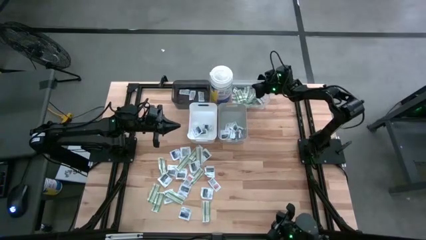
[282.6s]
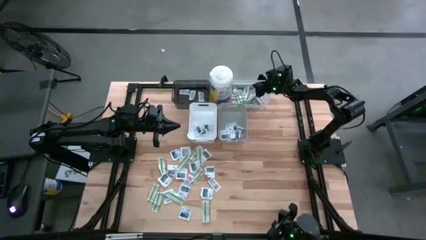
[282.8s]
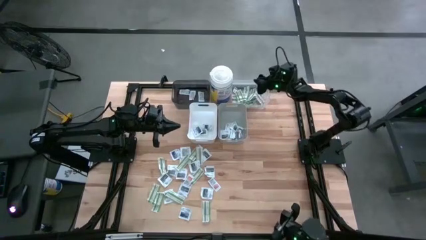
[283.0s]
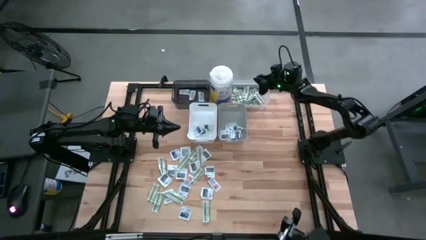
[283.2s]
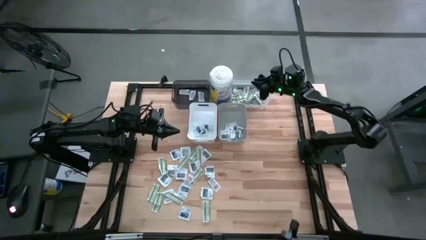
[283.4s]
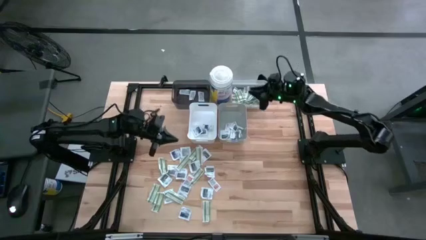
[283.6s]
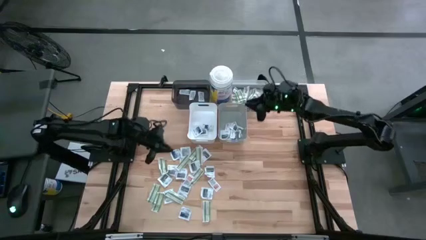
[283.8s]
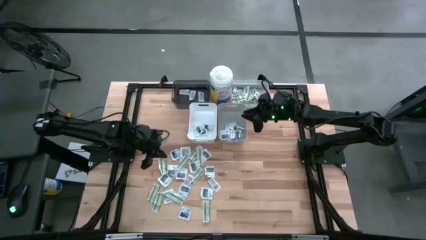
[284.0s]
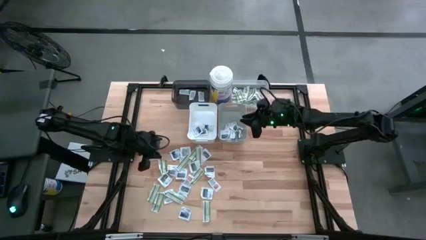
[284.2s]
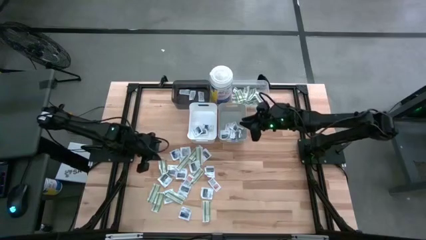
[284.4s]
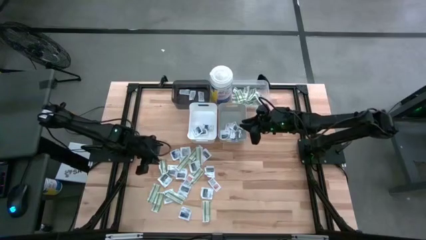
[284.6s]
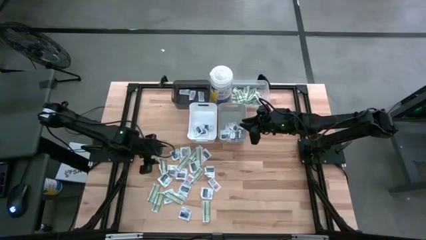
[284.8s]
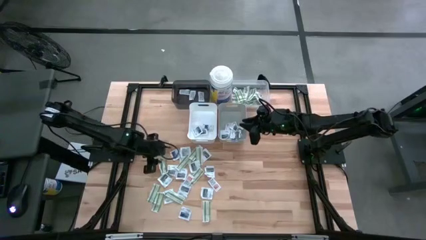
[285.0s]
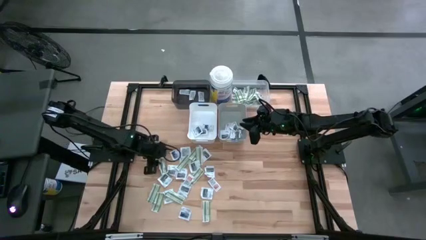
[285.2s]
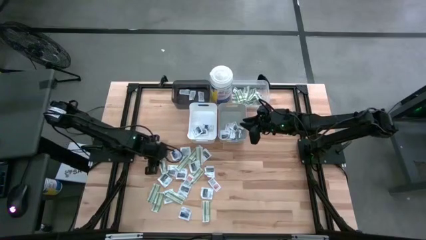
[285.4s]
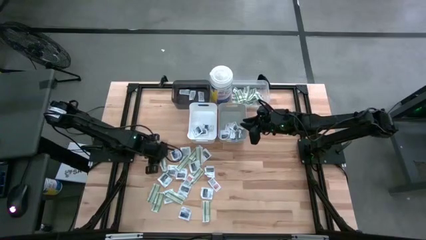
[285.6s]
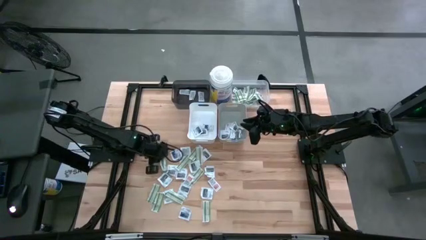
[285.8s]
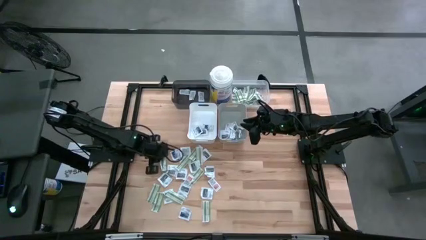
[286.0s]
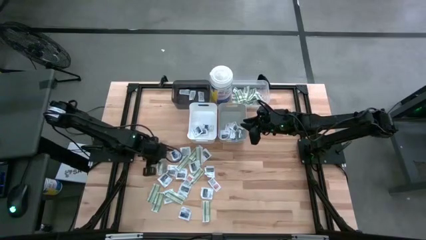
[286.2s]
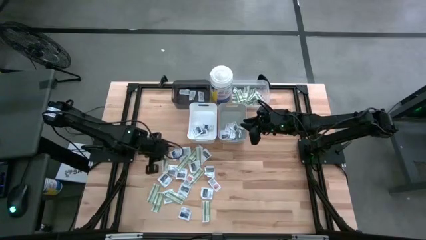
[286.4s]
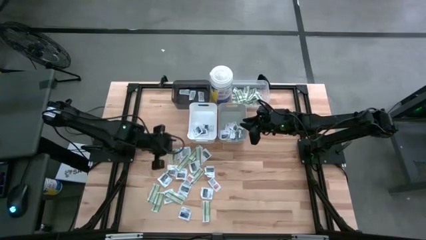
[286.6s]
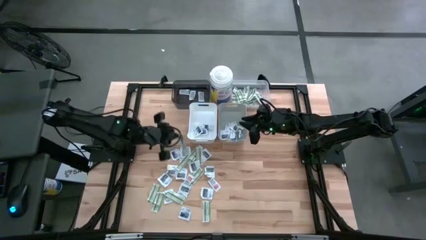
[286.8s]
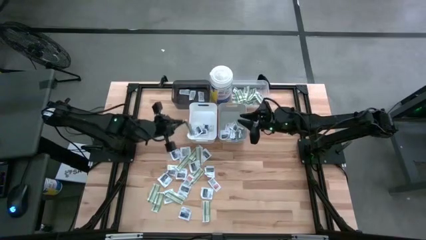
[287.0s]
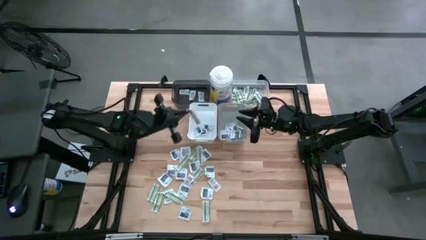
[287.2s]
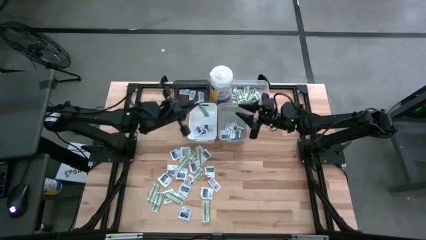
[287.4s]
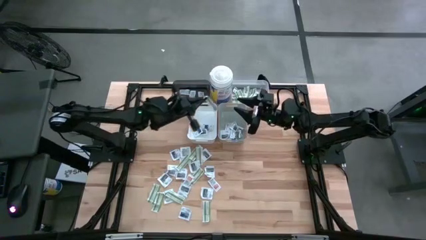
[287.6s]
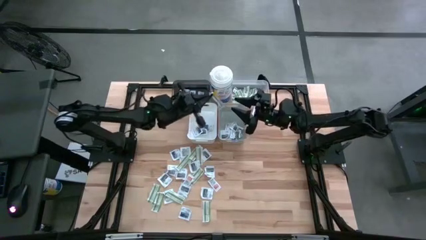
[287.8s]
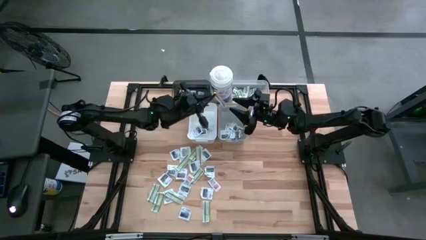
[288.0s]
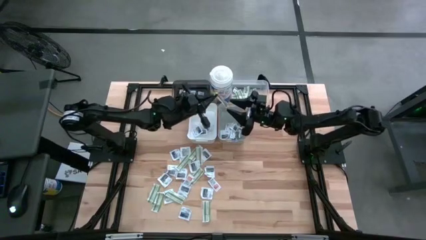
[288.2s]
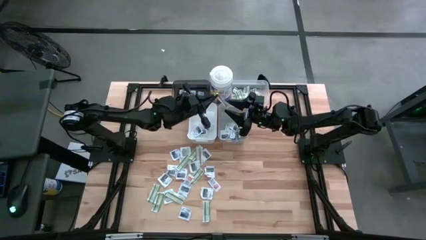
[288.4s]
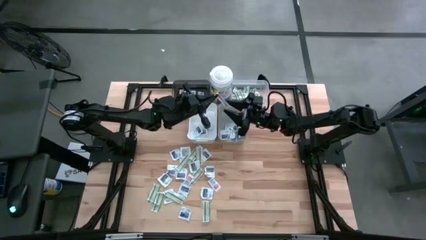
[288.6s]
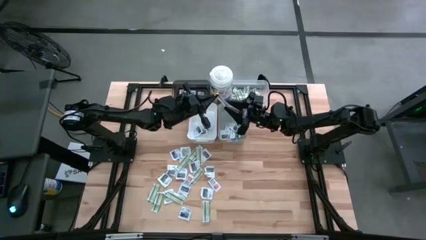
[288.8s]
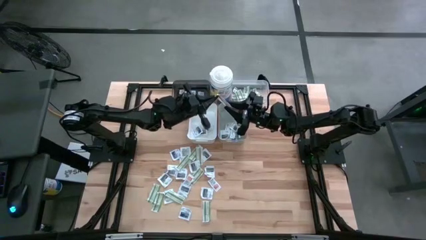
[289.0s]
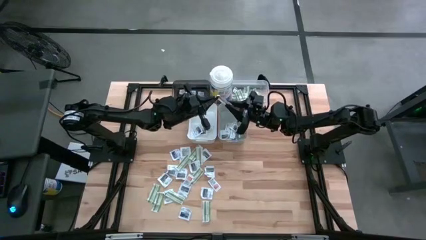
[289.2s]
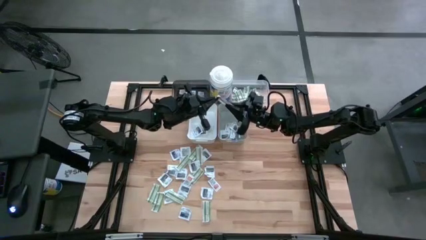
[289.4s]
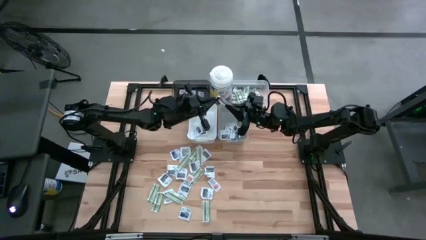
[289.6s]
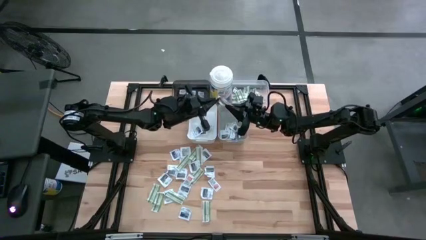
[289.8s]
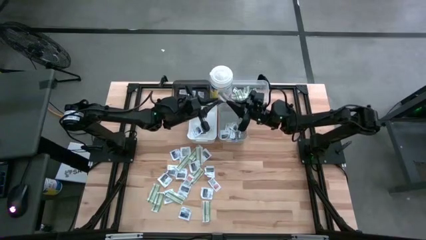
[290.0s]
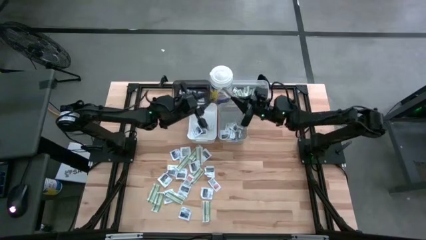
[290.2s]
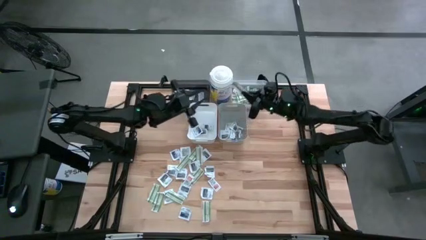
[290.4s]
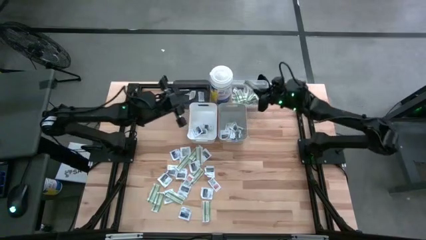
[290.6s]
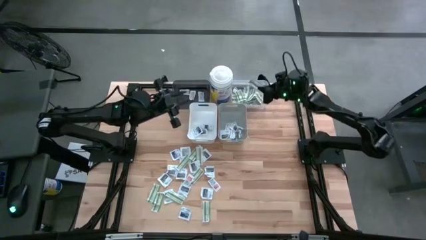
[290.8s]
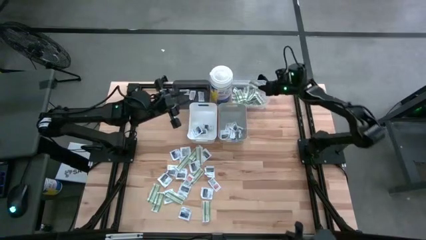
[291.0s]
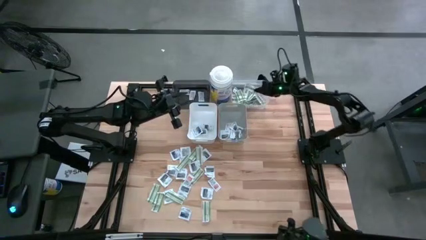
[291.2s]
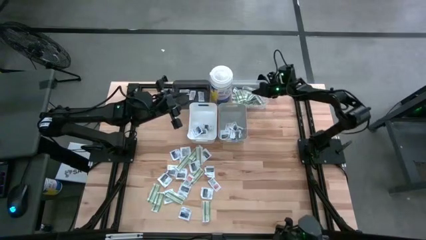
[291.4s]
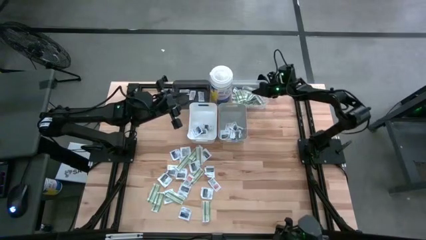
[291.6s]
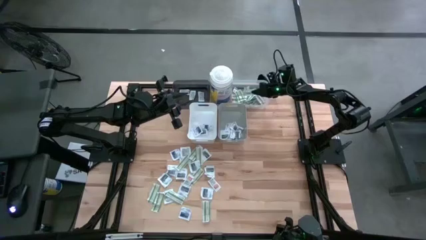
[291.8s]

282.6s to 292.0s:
Task: Pick & Place First Aid Supplies
Put the band aid into the transparent bin

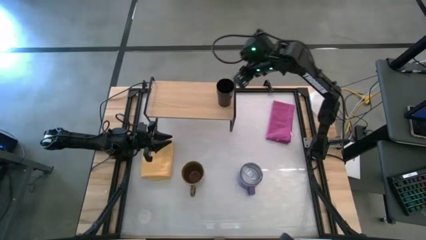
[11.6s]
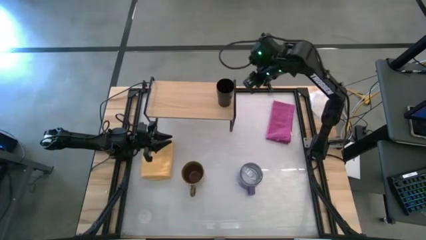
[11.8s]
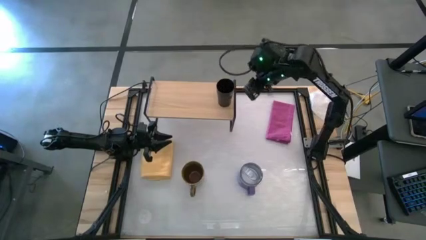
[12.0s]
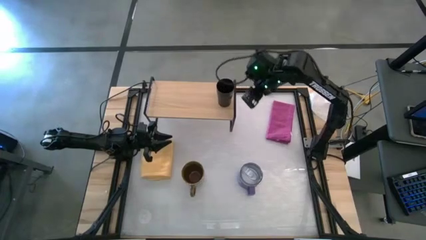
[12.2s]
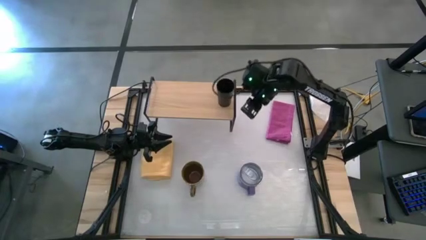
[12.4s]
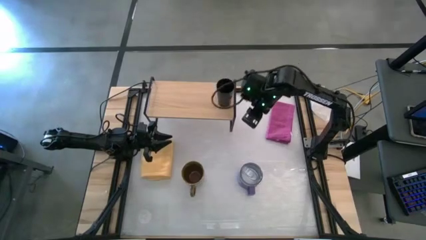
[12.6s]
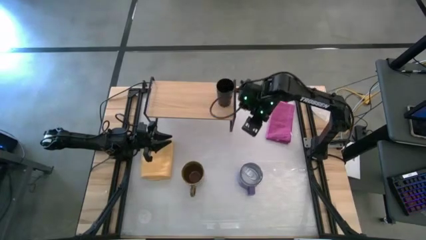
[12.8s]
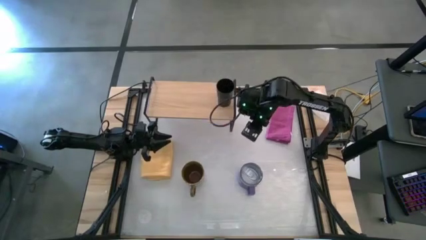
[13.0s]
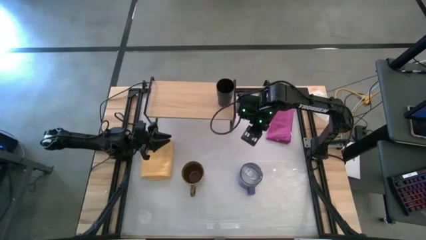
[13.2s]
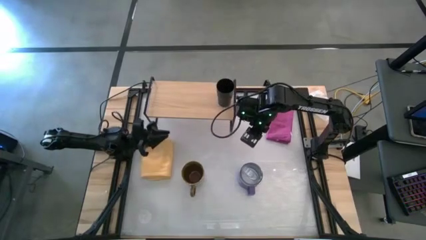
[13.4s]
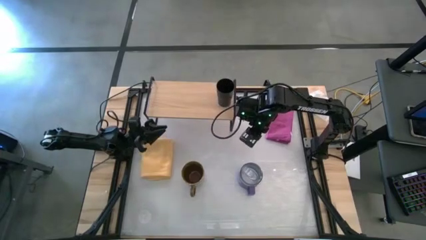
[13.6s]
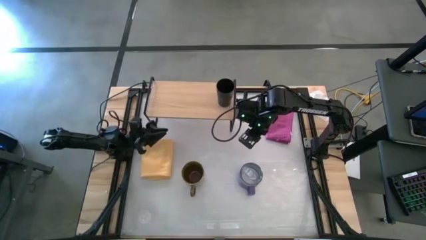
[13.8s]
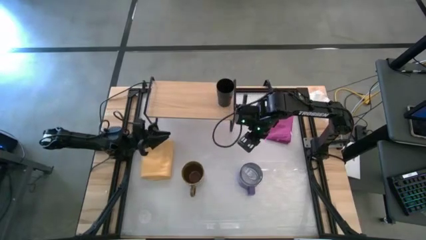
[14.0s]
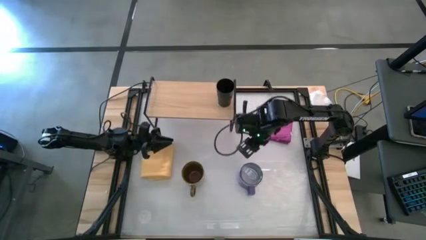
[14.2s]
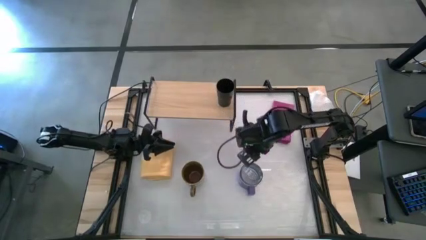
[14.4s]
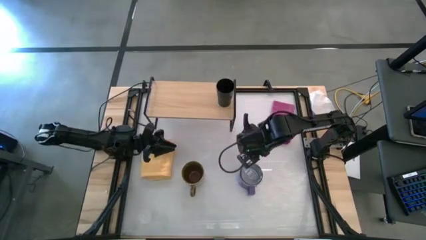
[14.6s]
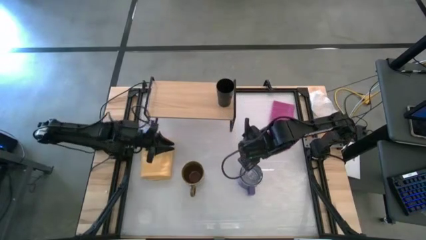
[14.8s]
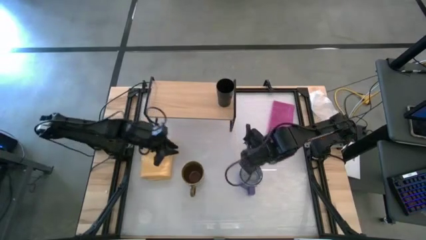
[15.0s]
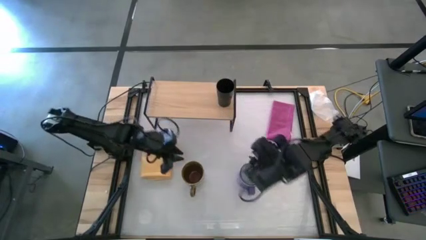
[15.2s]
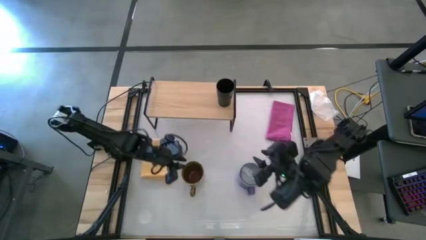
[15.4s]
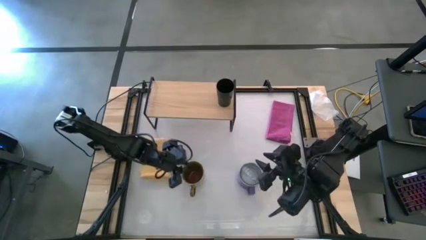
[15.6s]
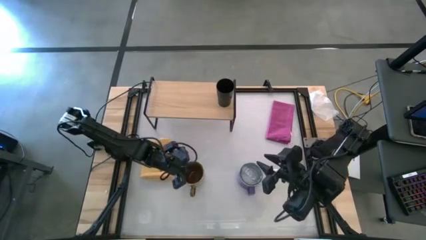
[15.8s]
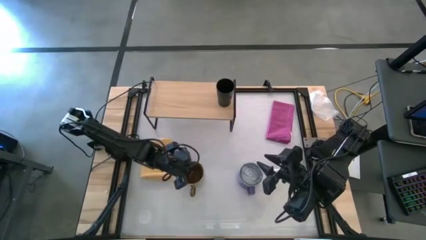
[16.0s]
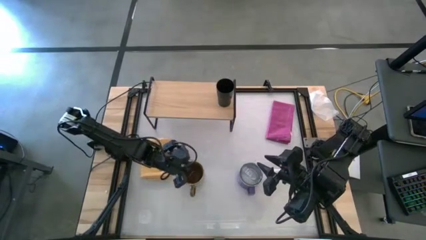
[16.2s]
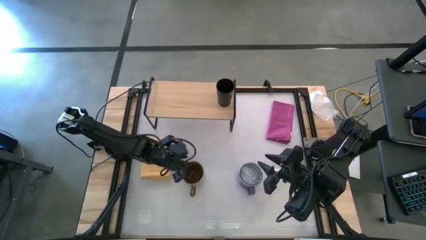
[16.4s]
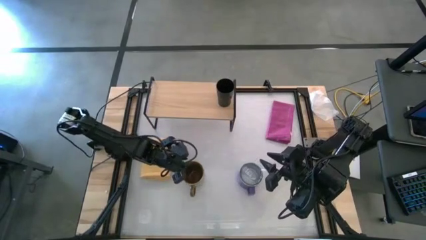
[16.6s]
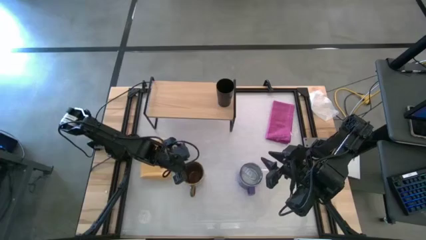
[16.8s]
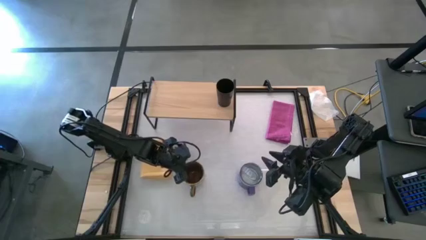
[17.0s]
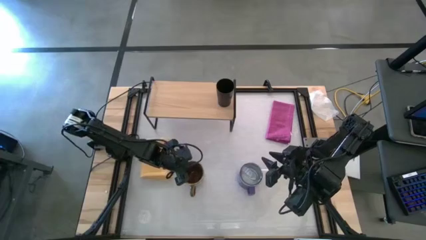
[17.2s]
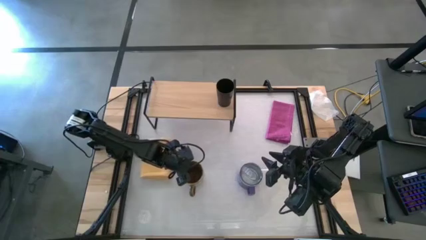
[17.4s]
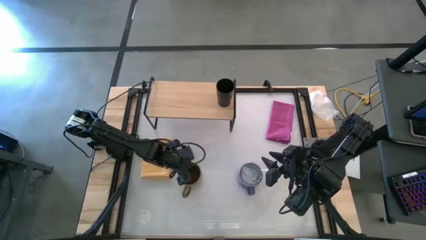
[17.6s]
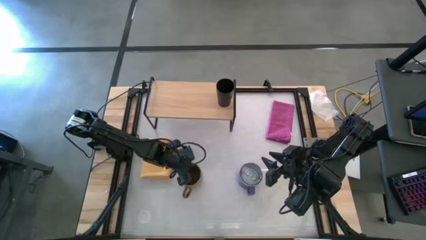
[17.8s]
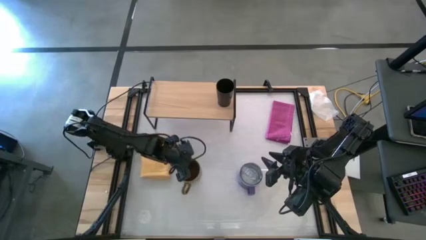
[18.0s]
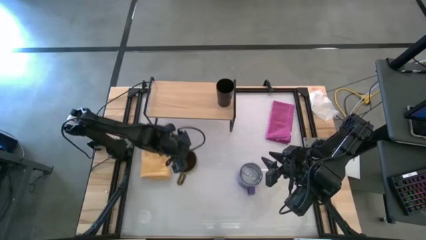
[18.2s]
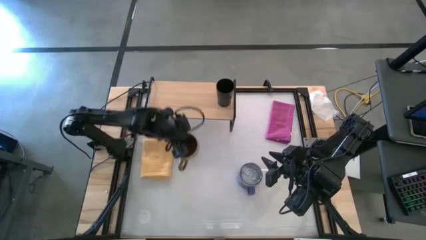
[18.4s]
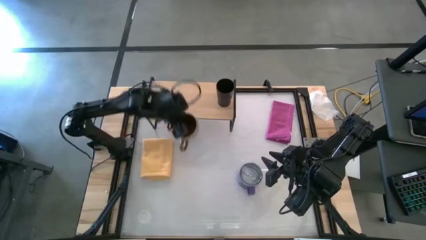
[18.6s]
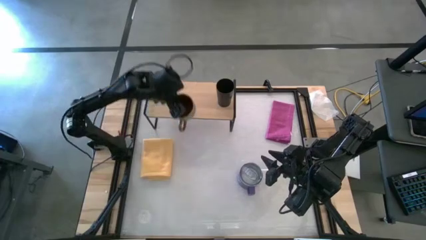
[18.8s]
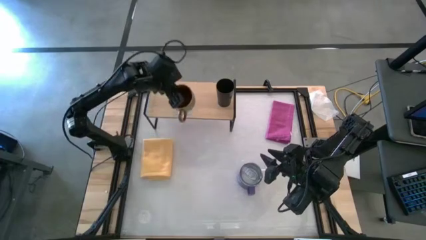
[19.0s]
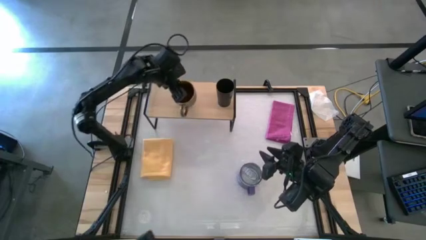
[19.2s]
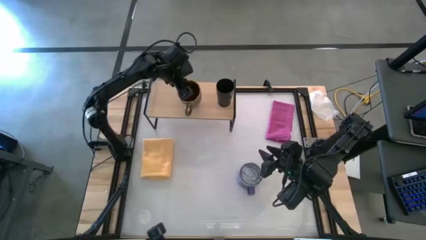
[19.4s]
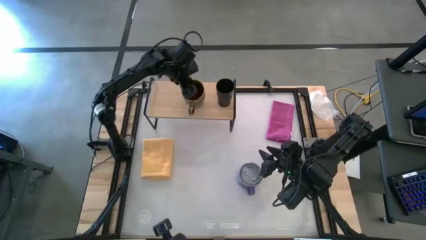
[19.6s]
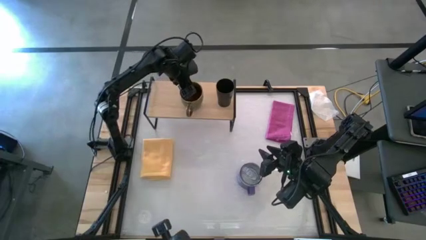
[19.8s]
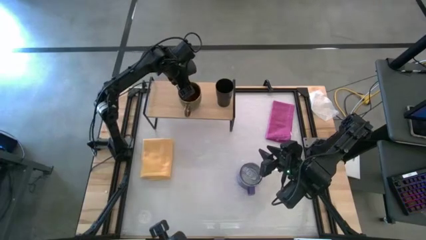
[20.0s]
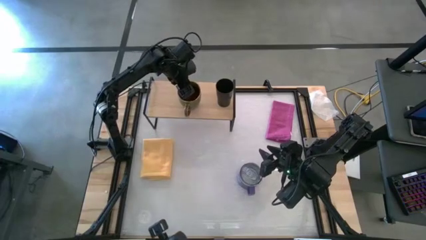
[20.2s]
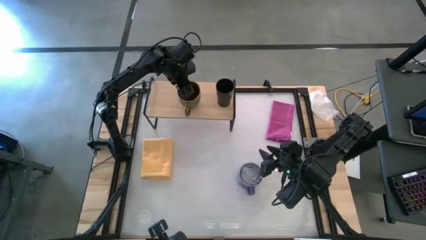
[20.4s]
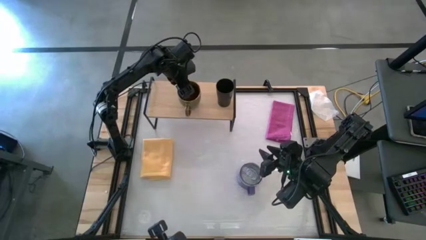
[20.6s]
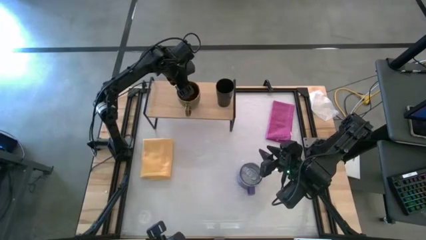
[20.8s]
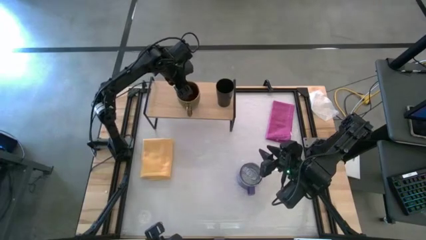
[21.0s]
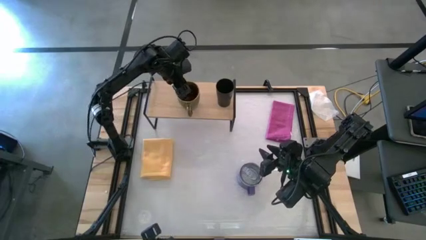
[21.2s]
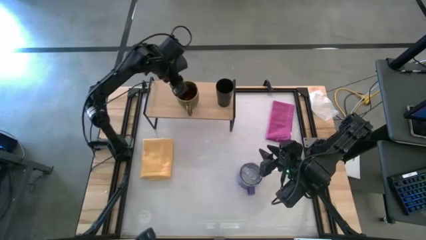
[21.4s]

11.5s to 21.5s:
Task: Stack small to large cups/mugs on shelf
Put the green mug on the shelf
